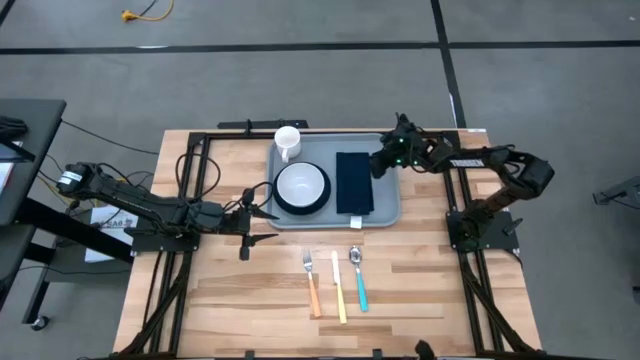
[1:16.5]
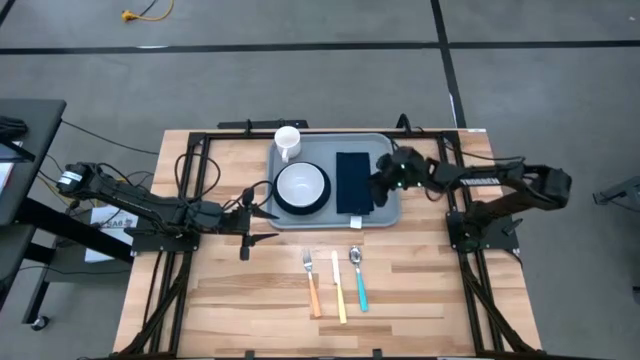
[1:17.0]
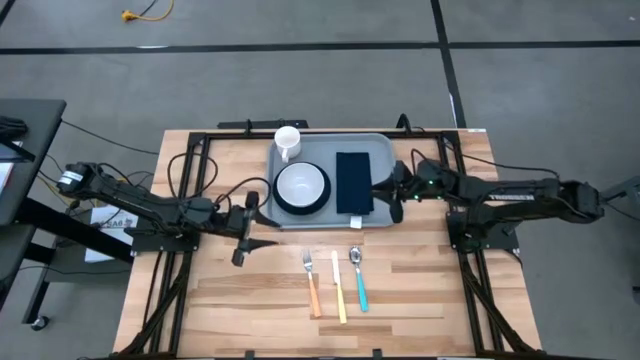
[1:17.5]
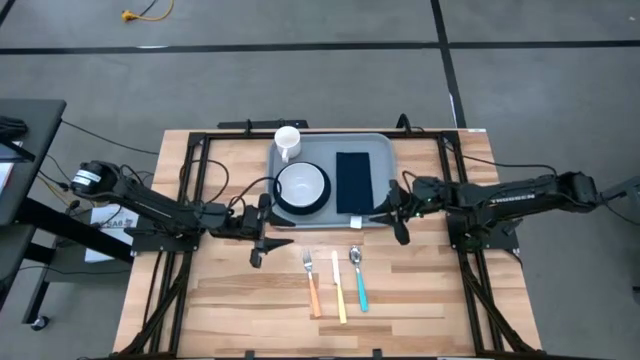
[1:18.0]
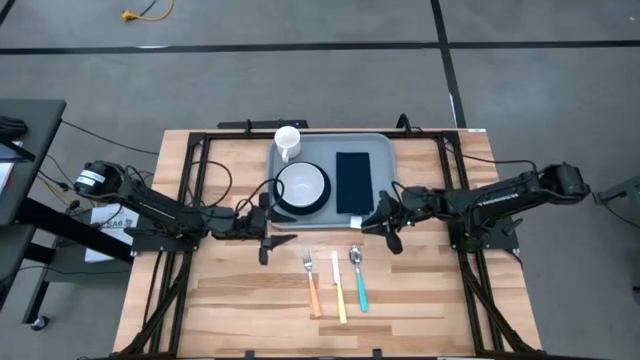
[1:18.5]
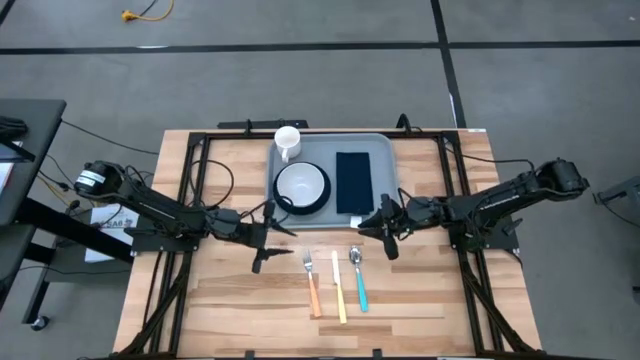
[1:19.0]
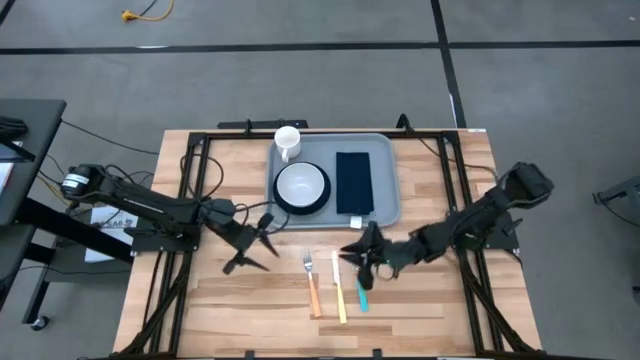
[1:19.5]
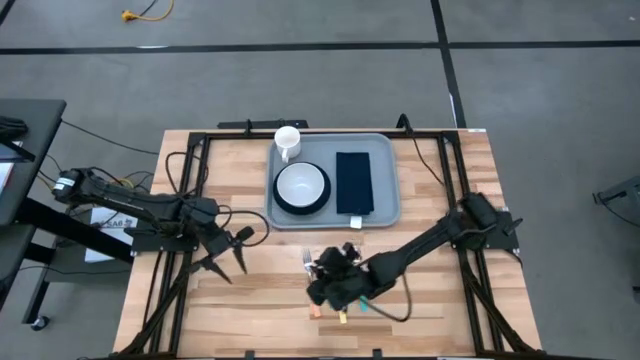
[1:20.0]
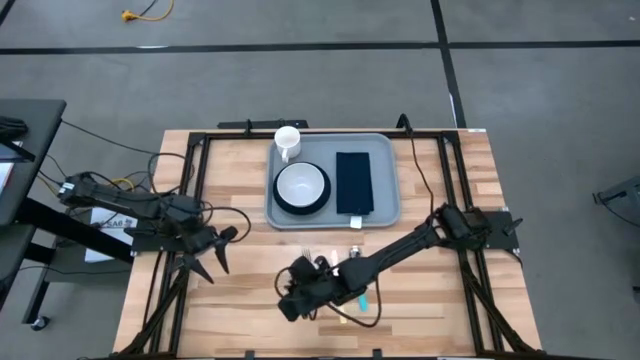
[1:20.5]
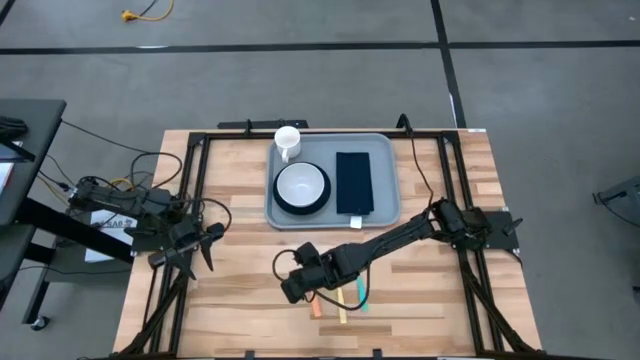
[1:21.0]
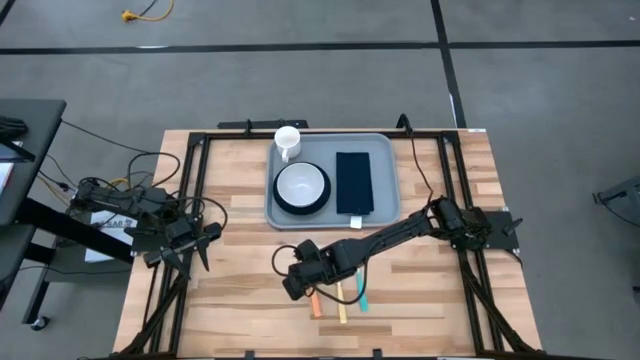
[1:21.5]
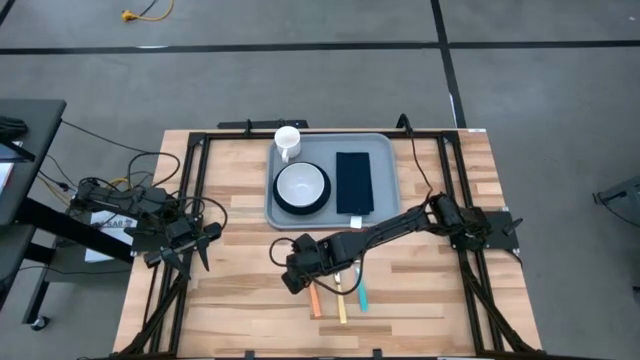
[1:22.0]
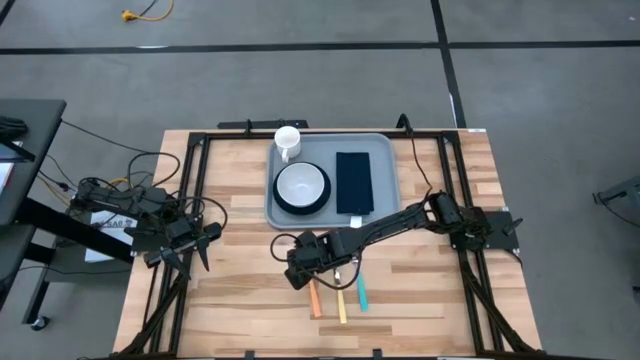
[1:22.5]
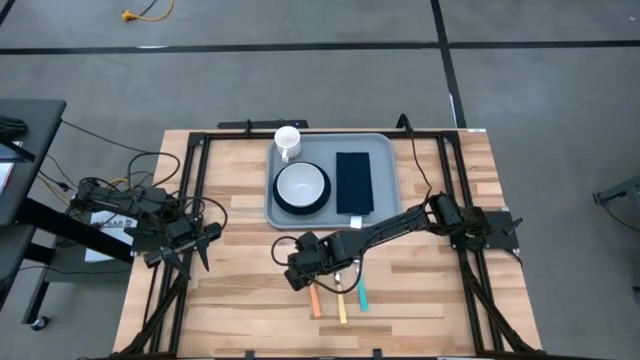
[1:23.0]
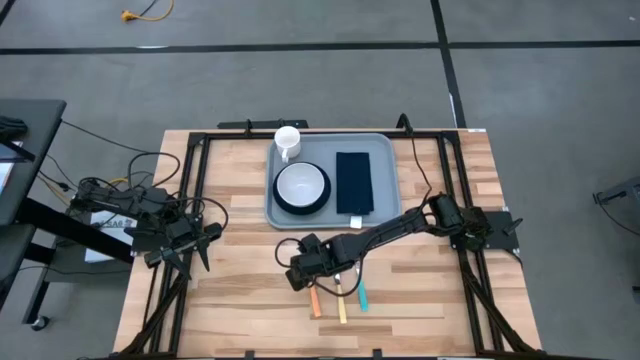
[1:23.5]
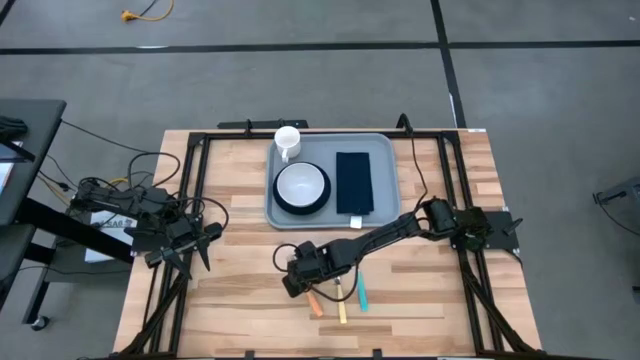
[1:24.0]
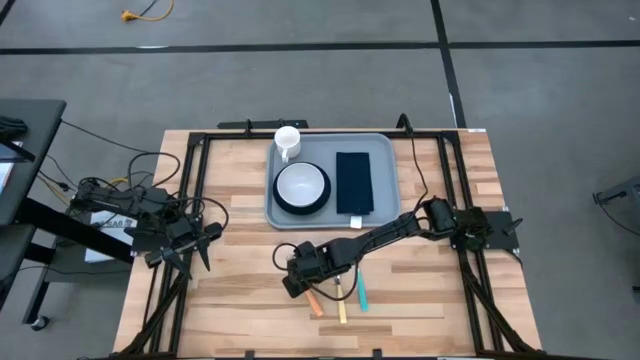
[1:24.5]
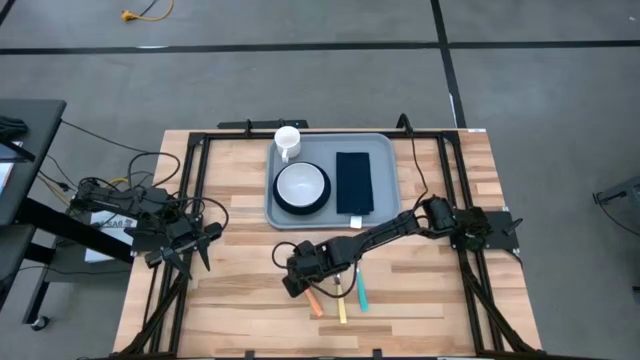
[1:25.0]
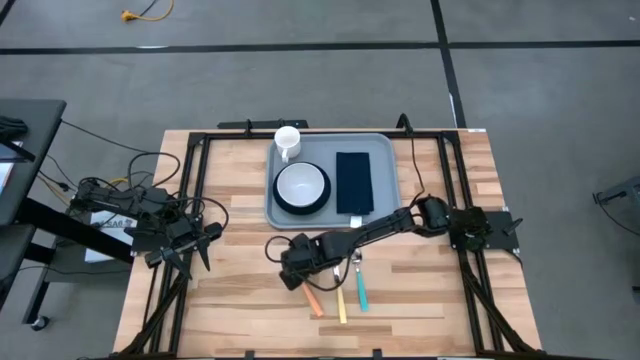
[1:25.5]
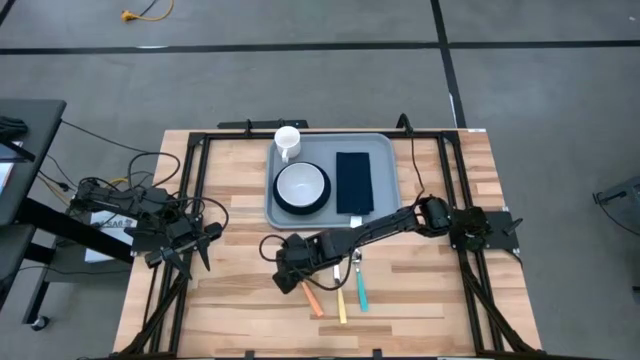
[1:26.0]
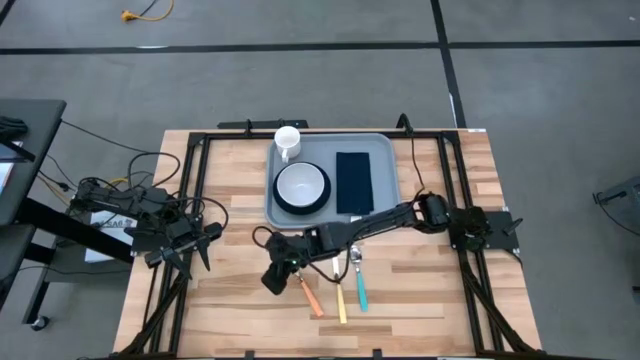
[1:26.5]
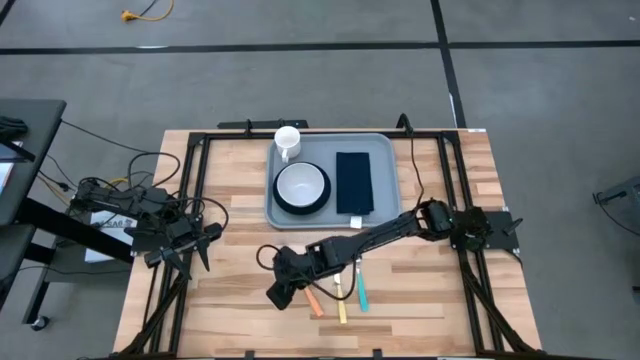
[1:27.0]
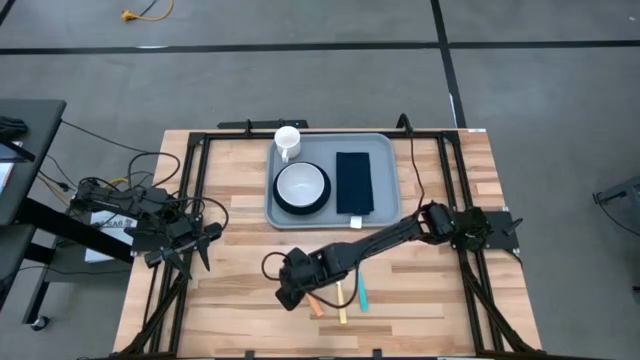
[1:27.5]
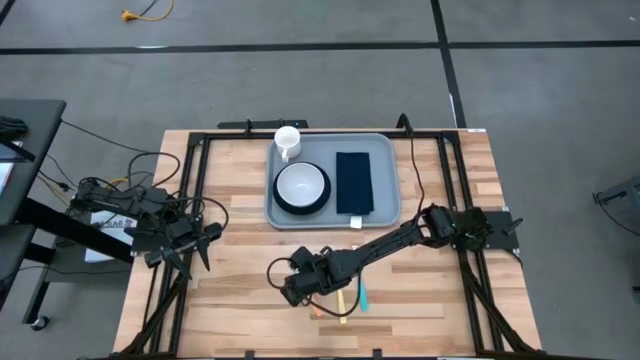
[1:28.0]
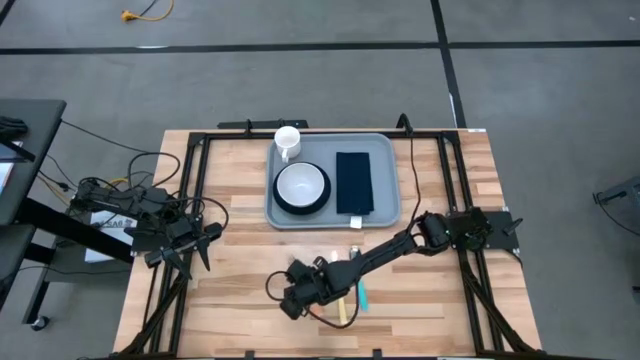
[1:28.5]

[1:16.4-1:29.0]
Task: Set up tray
Put the orange fork on top of the dark blue napkin

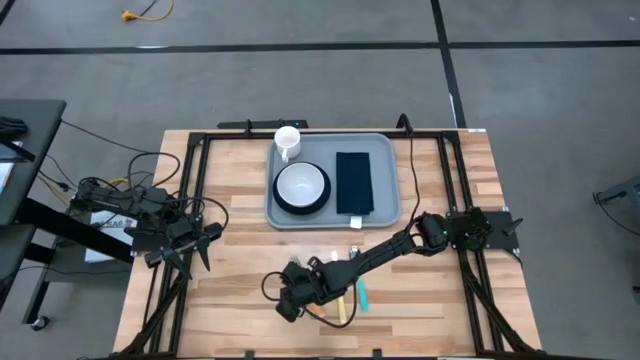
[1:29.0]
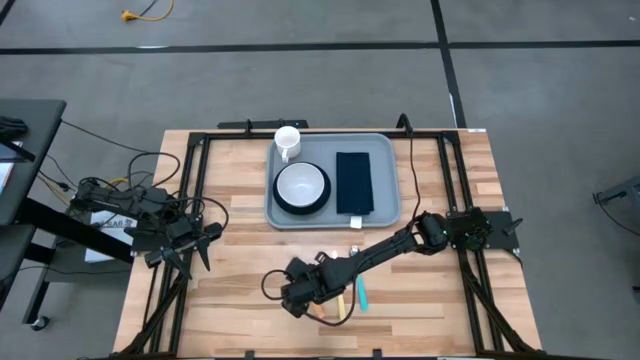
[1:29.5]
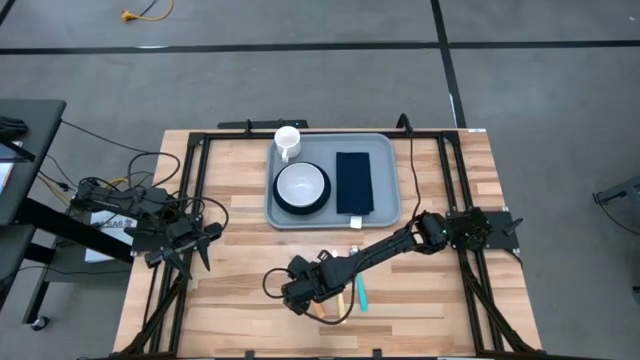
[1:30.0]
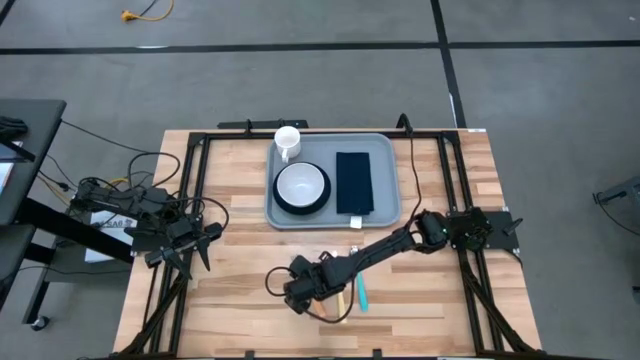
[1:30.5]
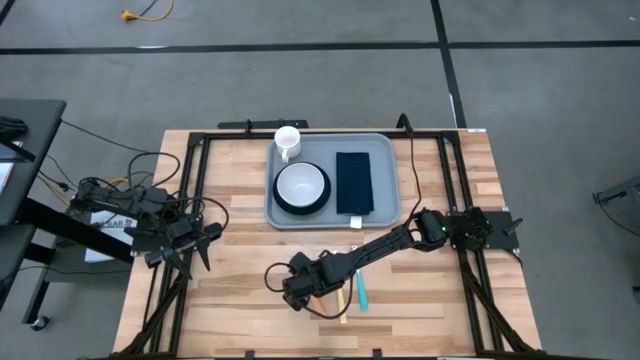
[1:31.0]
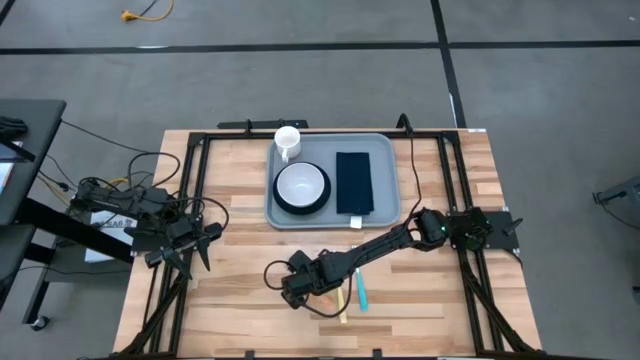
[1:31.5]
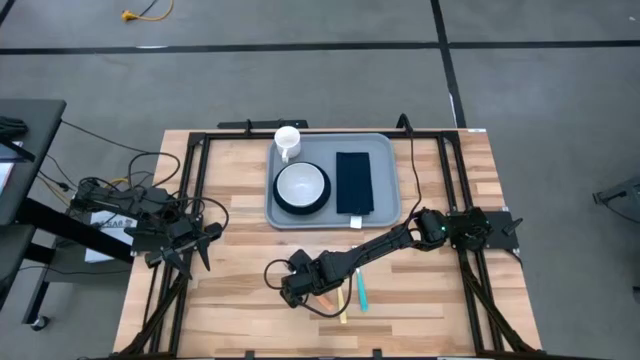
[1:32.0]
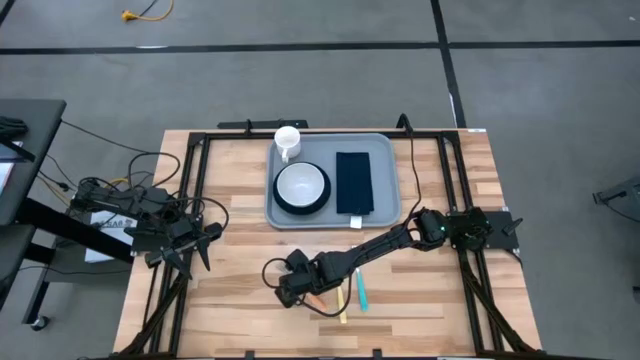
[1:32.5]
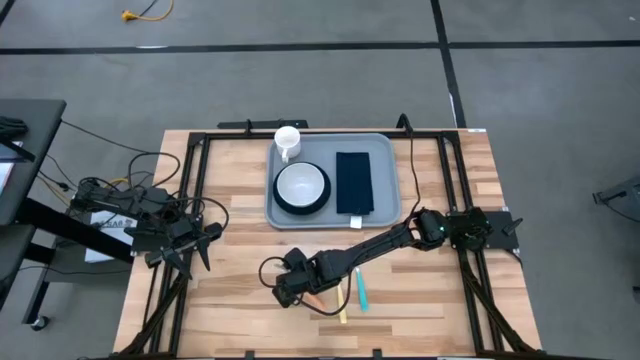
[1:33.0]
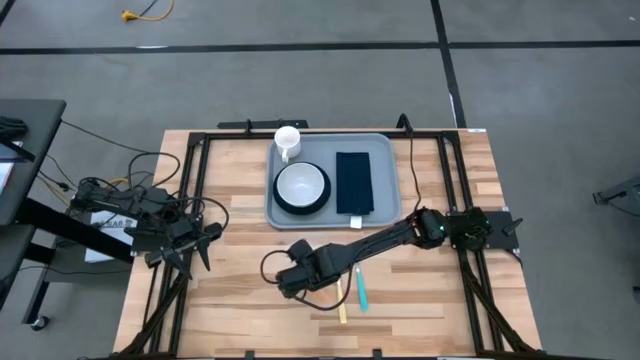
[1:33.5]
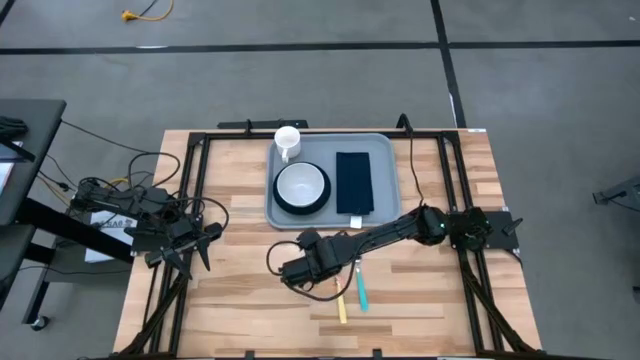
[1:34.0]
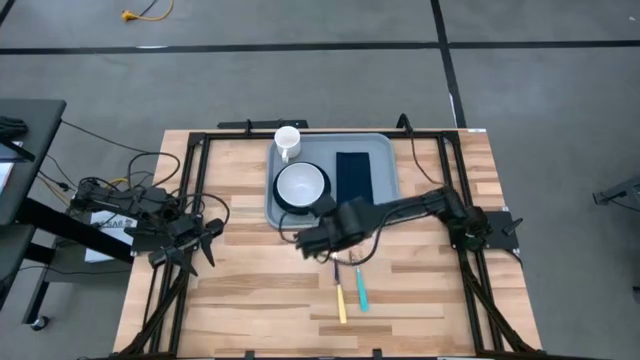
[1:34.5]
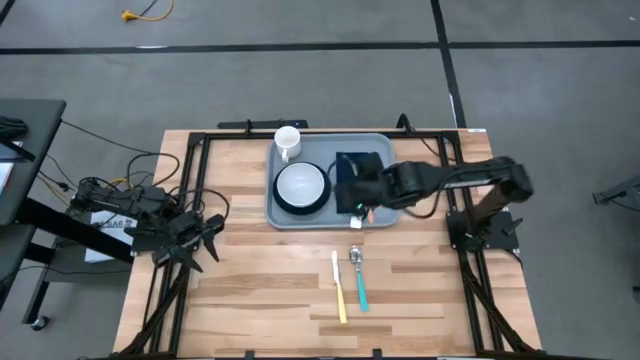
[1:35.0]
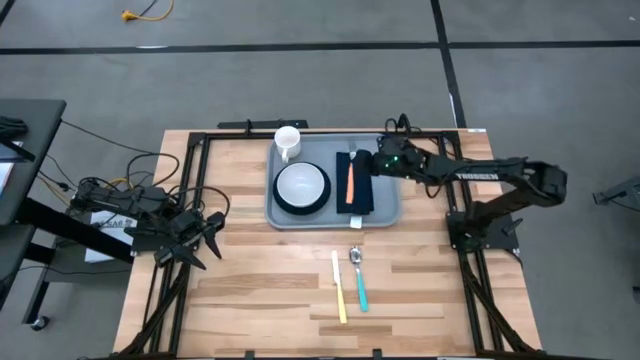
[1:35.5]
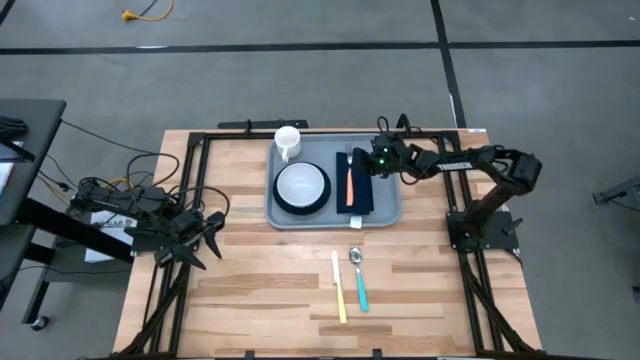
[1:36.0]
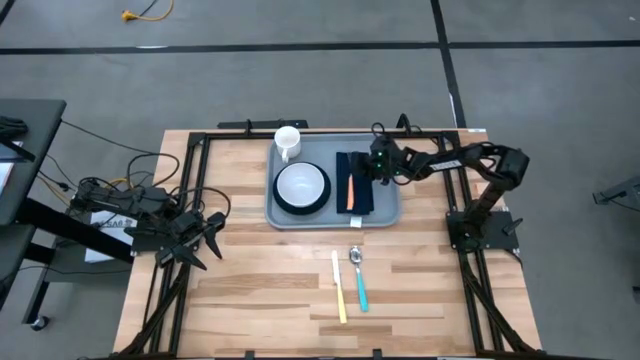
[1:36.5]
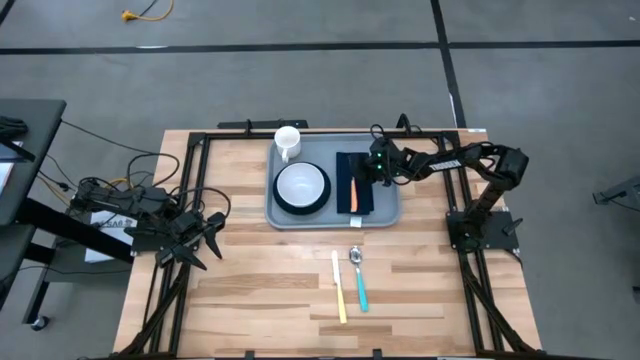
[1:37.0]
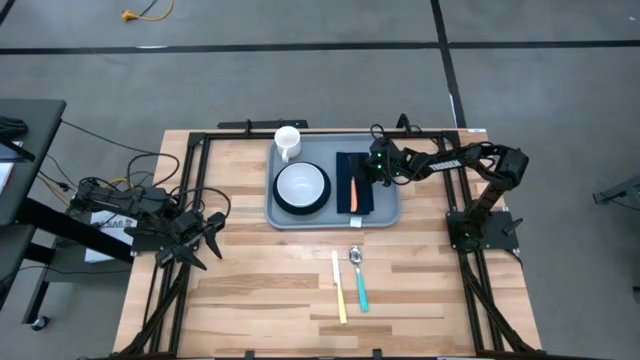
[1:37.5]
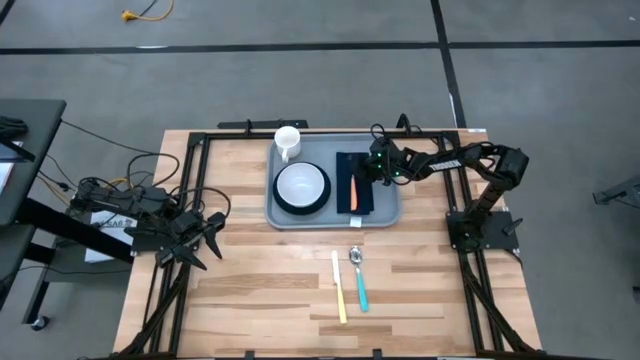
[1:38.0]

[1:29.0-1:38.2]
Put the orange fork on top of the dark blue napkin
